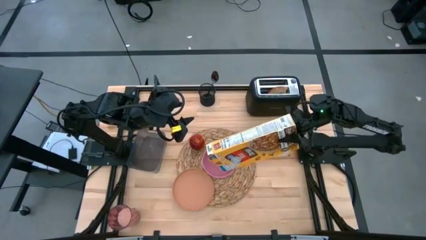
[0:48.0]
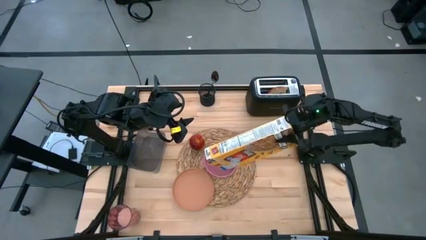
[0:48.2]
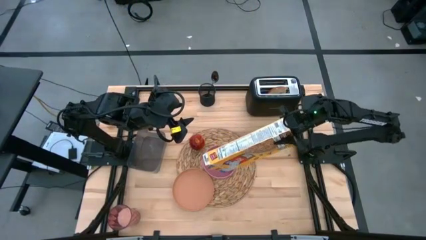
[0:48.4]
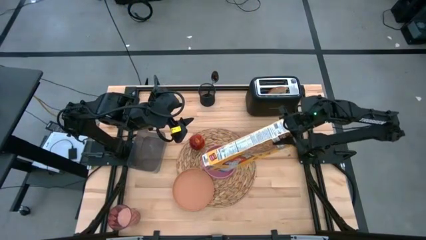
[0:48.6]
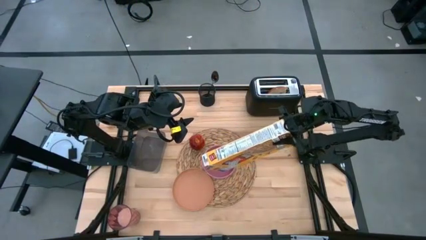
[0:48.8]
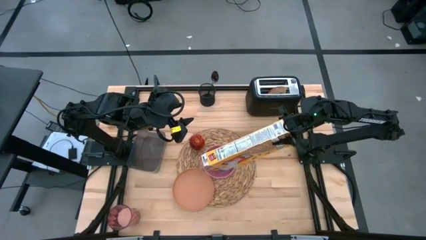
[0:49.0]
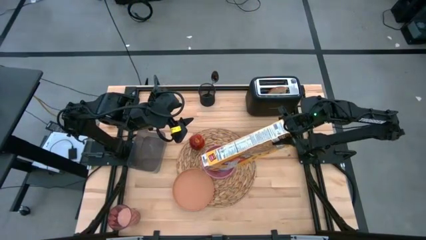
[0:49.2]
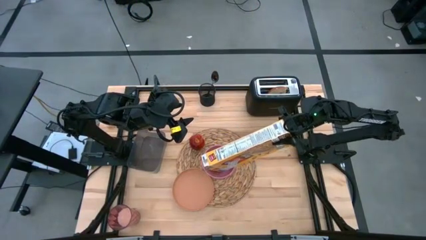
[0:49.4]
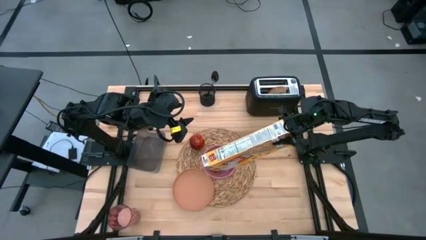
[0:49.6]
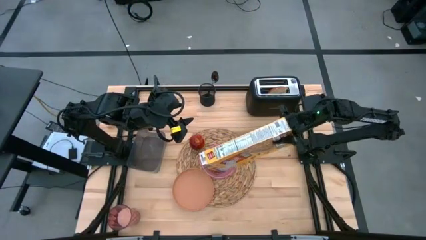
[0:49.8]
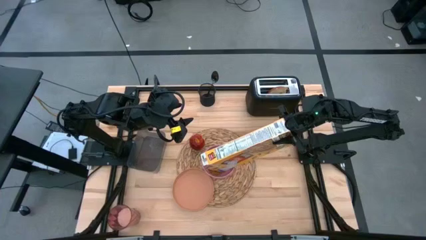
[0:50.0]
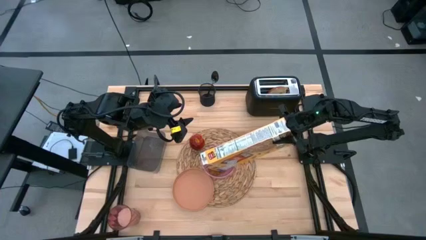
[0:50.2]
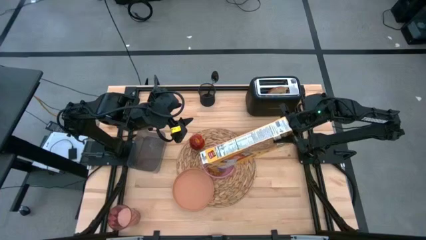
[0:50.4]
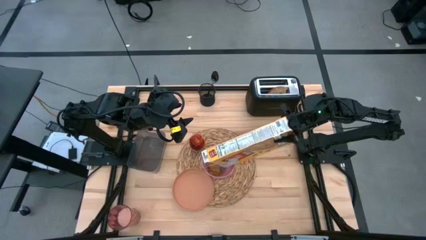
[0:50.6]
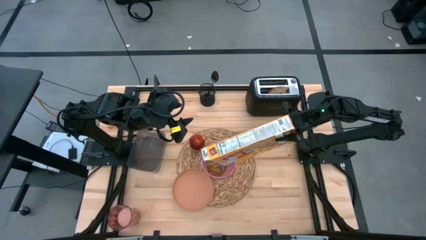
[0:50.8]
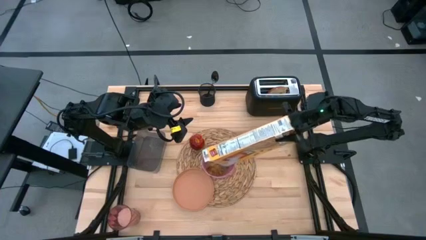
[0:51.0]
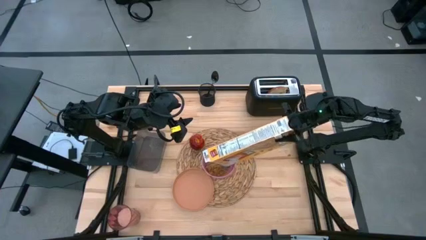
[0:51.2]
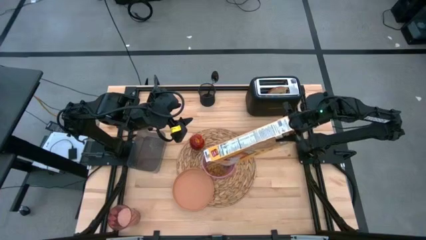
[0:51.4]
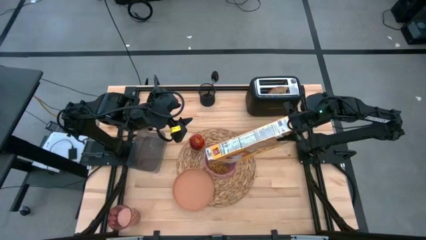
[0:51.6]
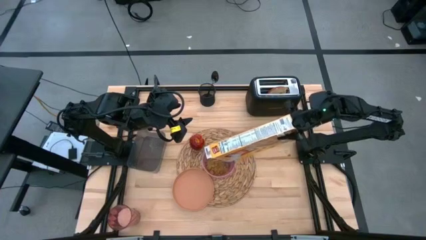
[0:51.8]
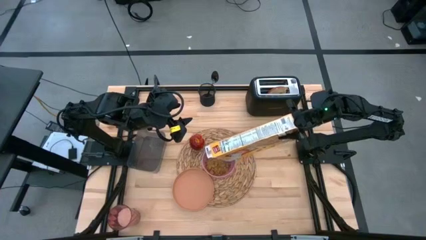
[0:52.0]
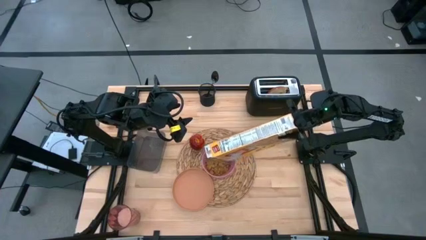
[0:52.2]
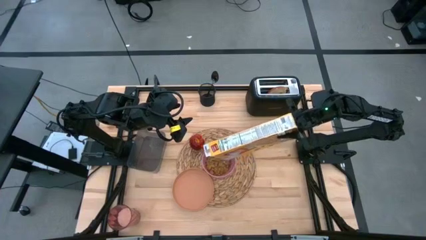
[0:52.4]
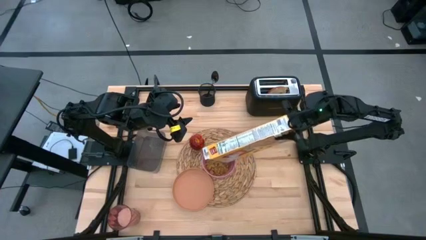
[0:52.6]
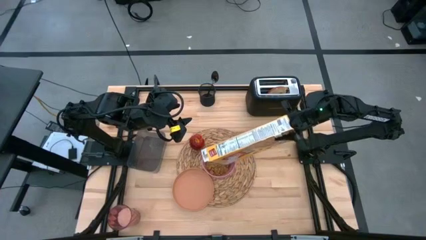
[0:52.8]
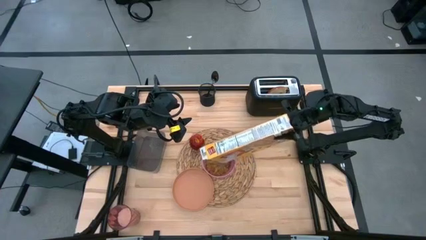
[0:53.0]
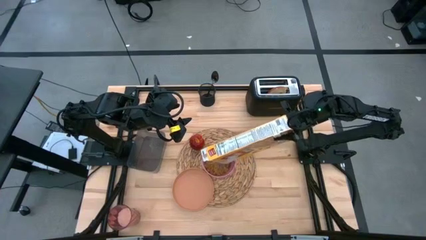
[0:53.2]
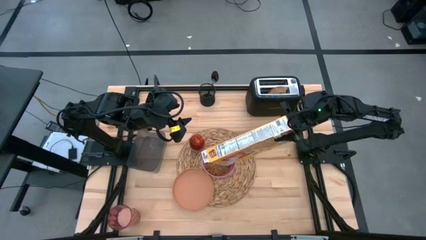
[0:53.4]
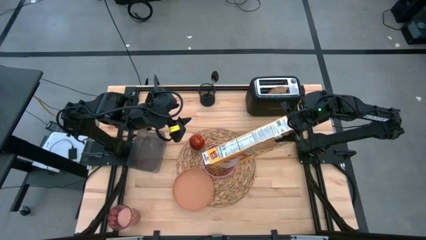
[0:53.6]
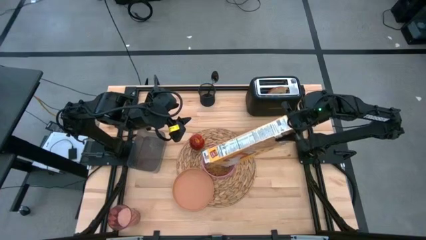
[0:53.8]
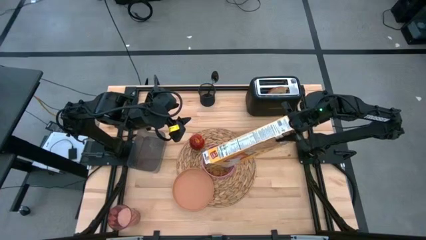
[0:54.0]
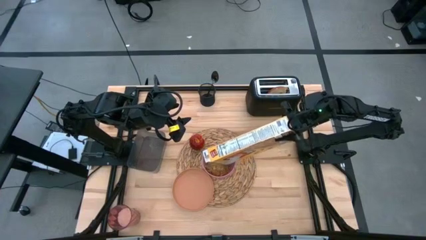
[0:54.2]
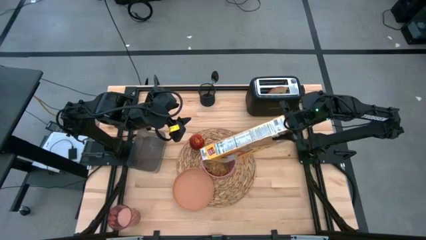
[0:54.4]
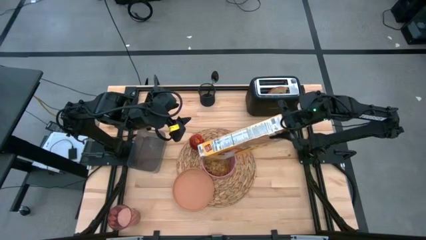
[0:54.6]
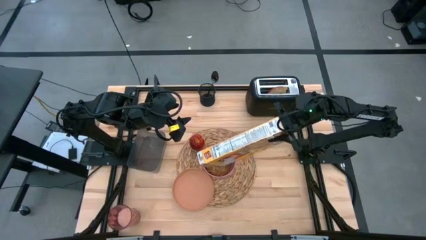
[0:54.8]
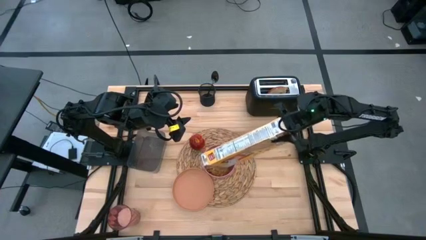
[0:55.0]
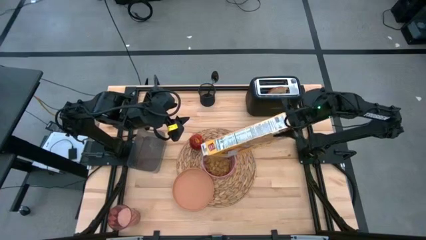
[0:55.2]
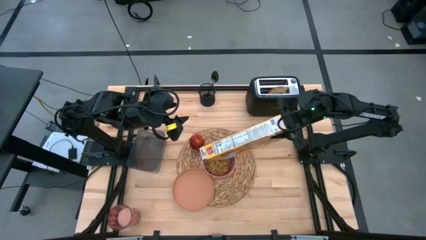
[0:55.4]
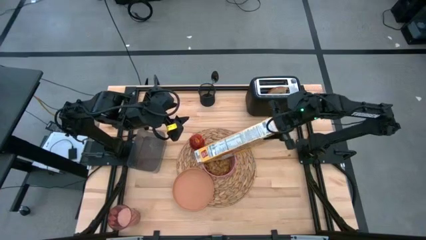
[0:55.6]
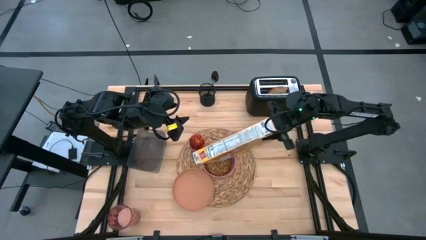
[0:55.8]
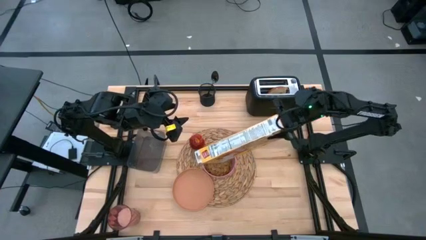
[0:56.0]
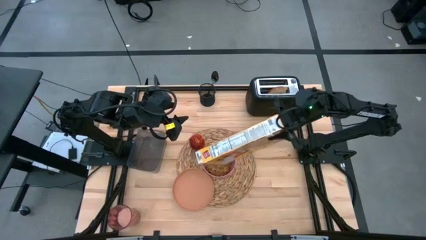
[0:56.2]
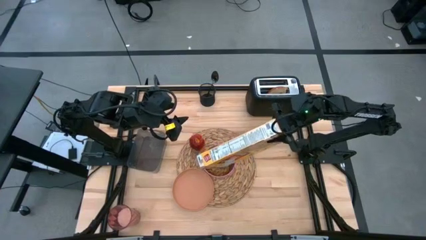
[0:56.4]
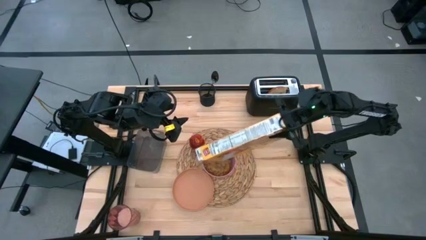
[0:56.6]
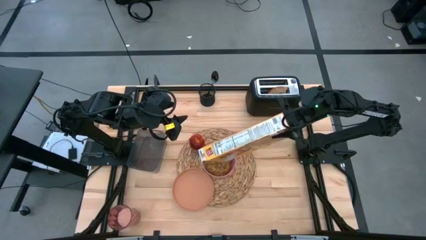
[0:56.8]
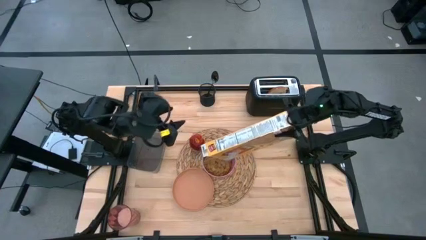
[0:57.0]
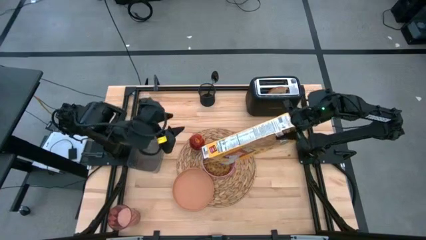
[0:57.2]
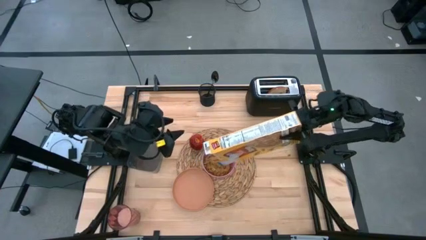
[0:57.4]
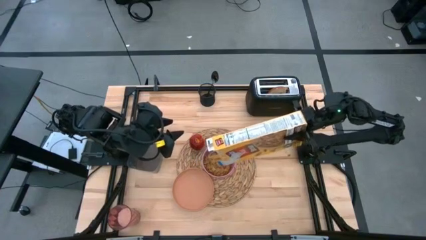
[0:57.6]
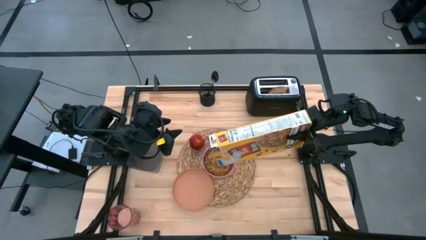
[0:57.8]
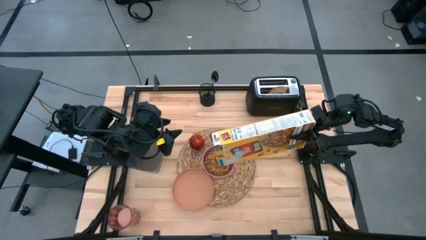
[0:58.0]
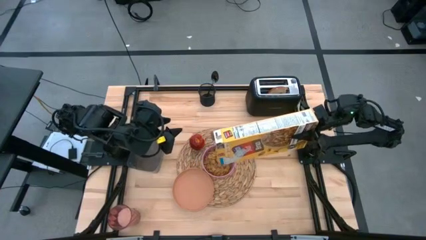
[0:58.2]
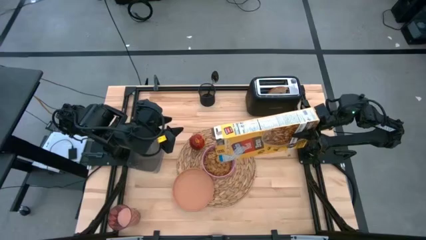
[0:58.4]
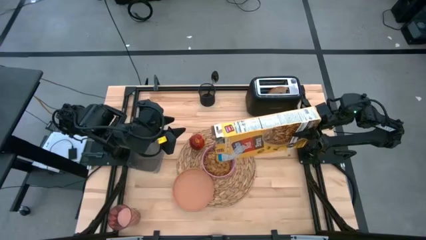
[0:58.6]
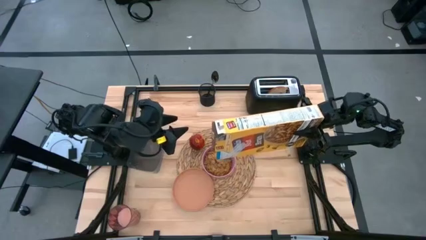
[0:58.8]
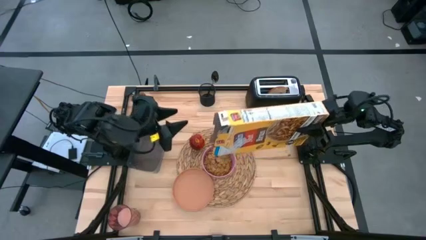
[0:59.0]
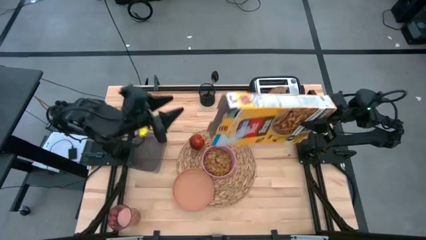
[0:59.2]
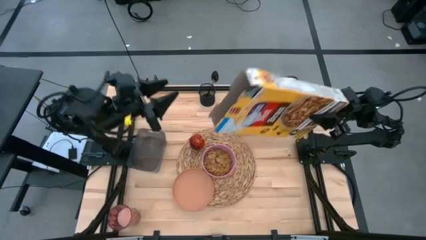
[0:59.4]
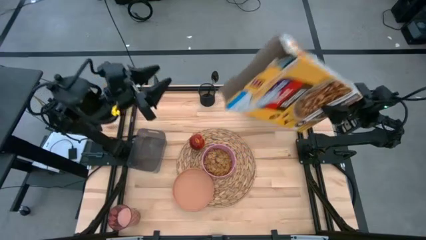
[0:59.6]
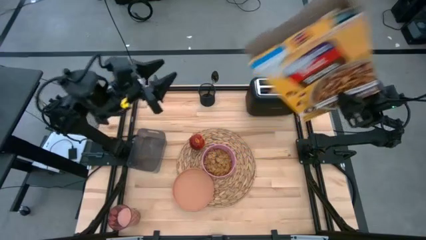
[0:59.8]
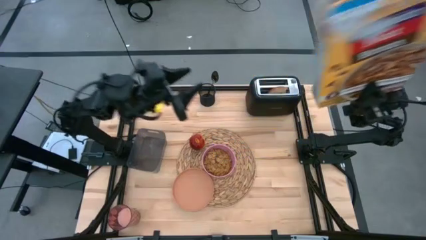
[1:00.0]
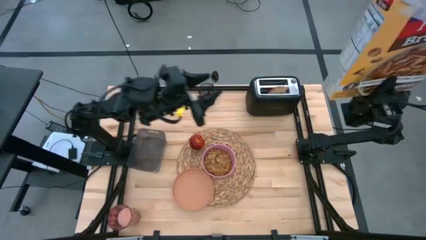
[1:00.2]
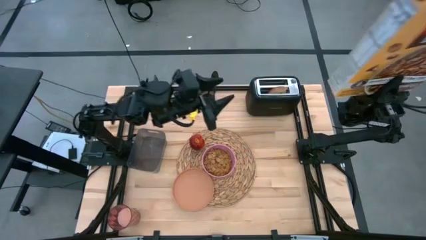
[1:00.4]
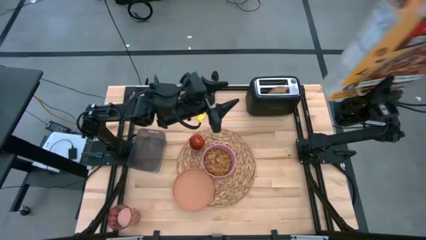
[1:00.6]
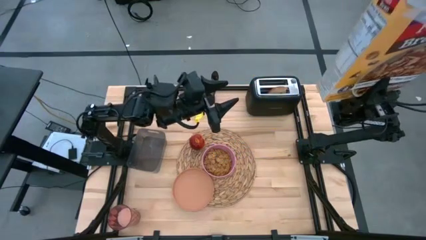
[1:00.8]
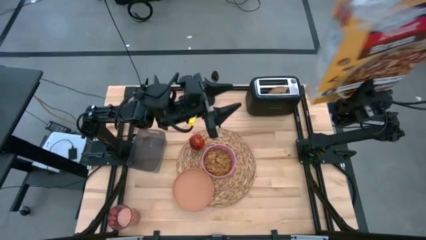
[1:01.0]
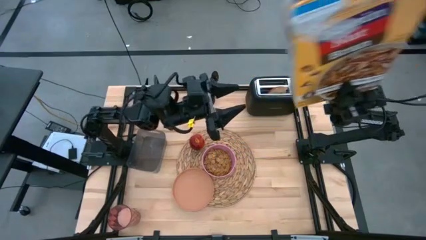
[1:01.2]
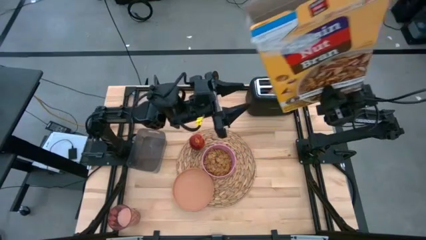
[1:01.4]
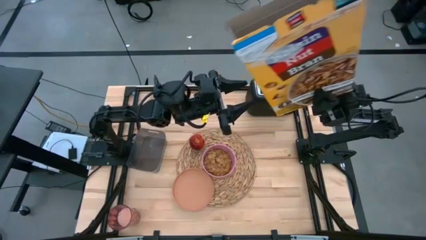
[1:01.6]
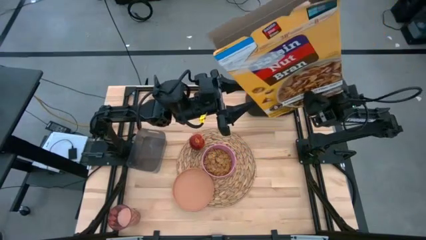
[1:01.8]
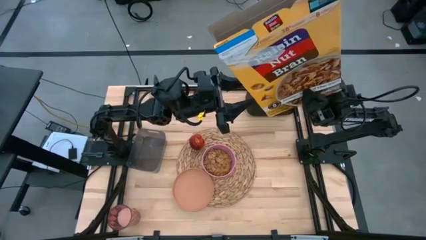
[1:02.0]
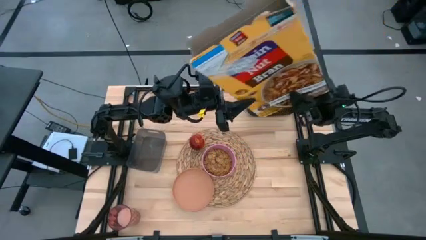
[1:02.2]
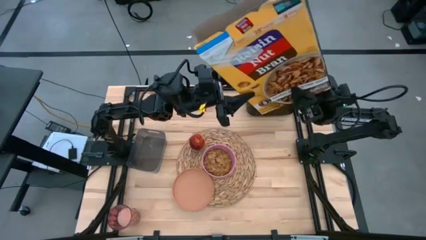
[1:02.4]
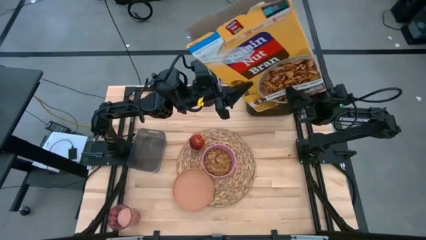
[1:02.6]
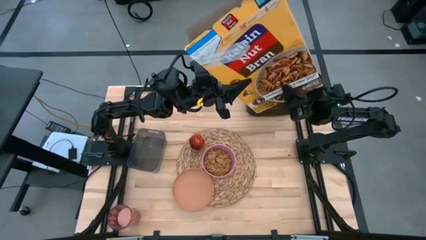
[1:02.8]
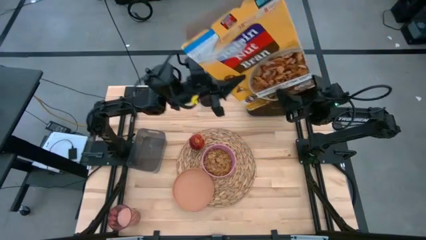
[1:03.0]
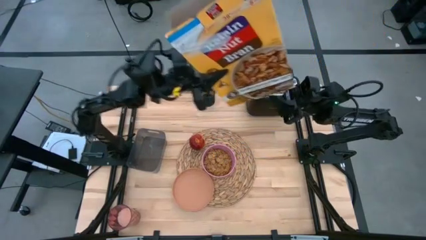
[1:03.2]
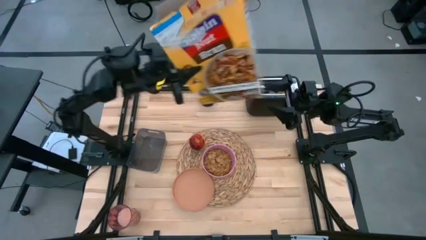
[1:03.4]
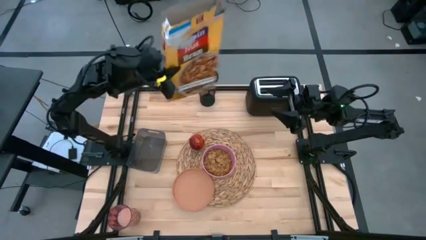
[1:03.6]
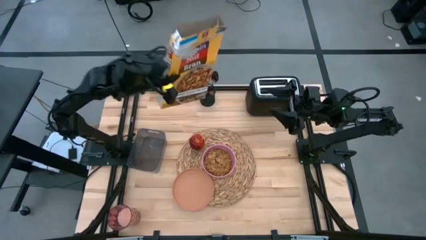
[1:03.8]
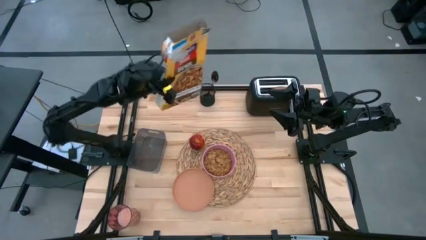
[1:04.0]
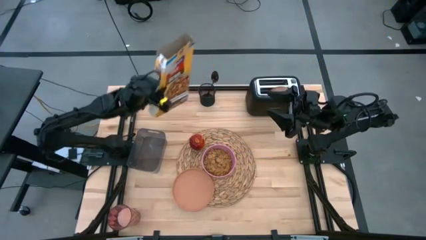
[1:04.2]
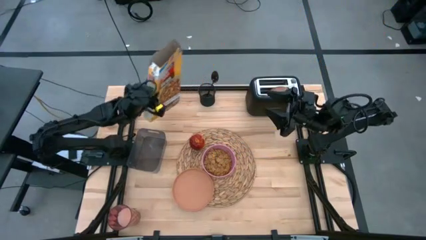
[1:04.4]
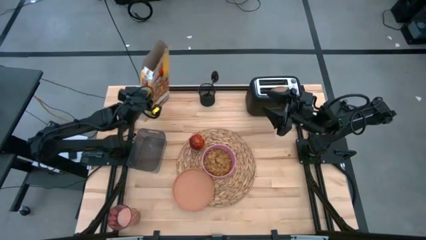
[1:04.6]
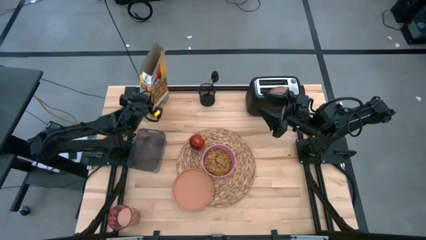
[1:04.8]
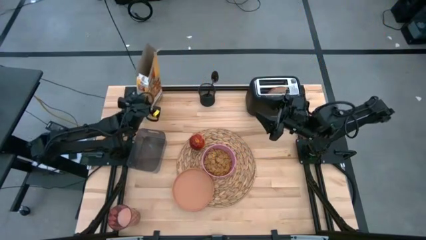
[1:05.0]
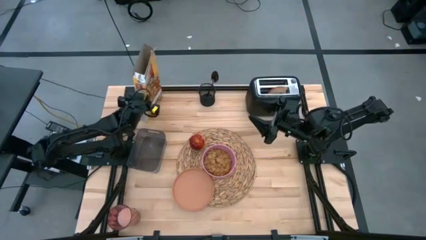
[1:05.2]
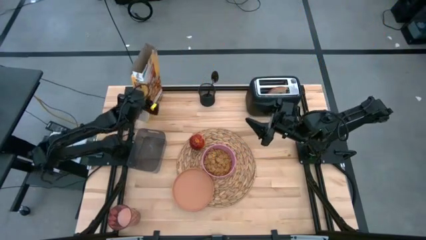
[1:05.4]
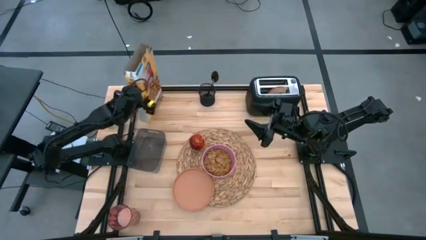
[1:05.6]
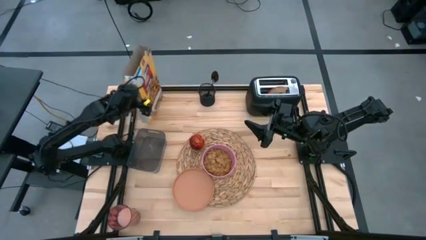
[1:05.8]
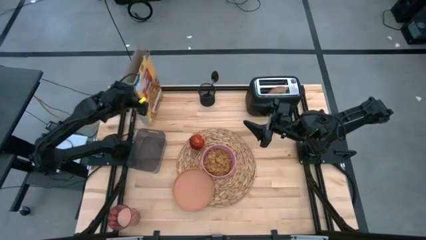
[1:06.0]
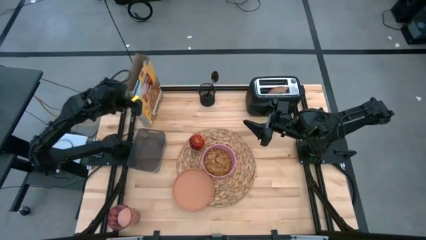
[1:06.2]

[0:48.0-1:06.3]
Task: Arrange a breakfast setting
Pour the cereal into the pink bowl
